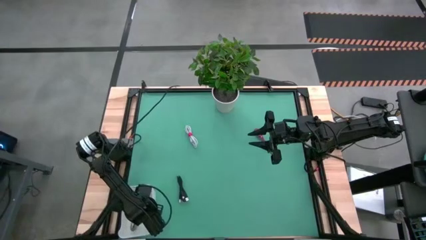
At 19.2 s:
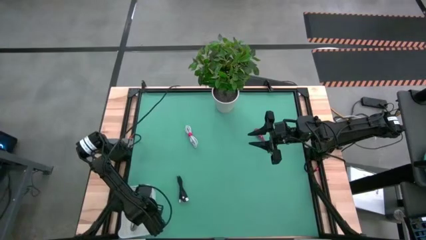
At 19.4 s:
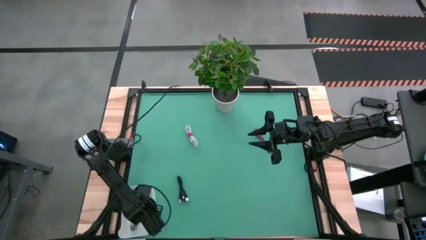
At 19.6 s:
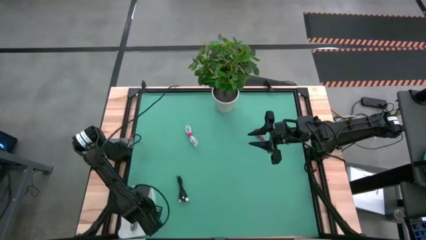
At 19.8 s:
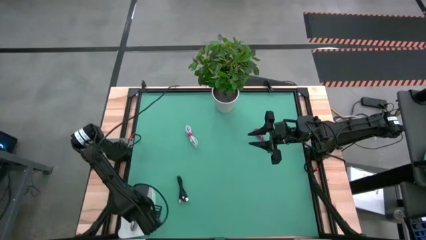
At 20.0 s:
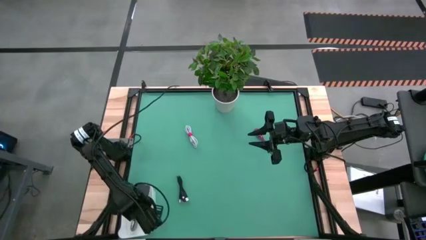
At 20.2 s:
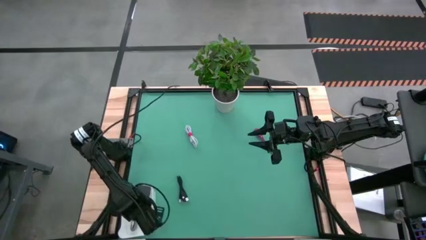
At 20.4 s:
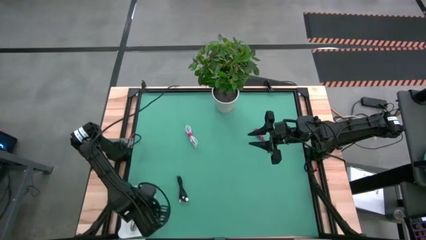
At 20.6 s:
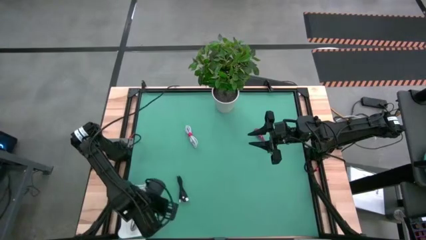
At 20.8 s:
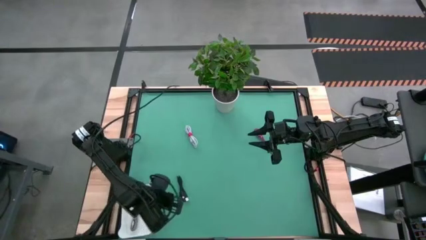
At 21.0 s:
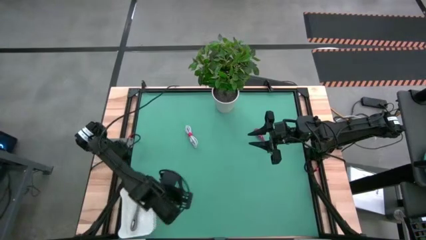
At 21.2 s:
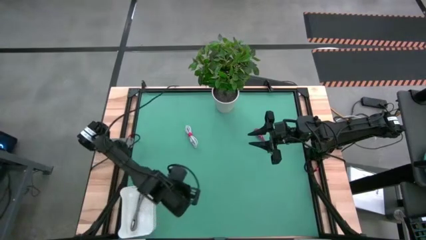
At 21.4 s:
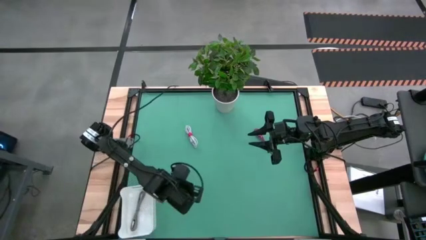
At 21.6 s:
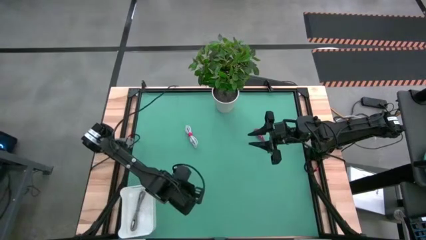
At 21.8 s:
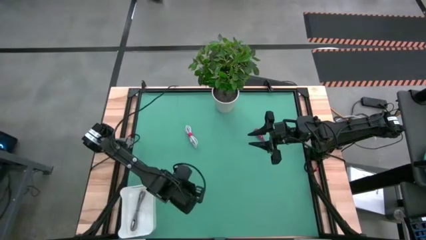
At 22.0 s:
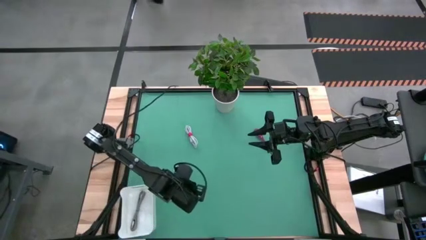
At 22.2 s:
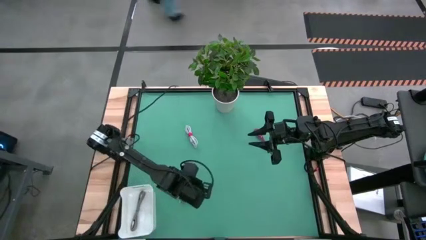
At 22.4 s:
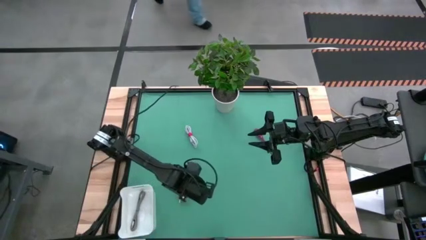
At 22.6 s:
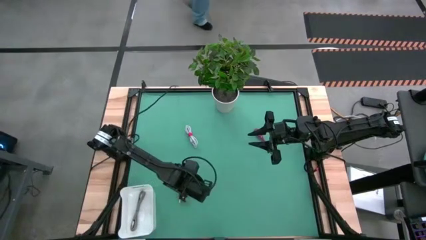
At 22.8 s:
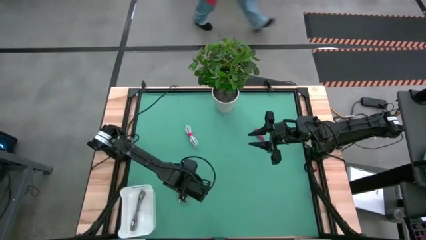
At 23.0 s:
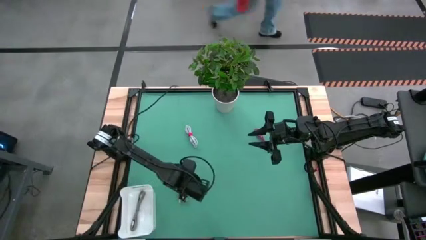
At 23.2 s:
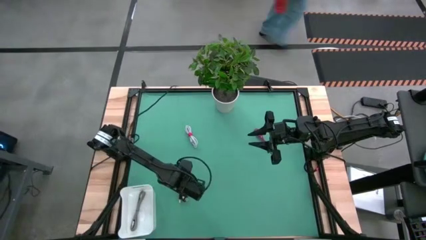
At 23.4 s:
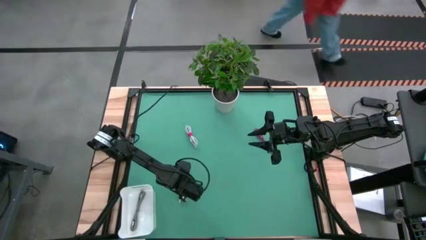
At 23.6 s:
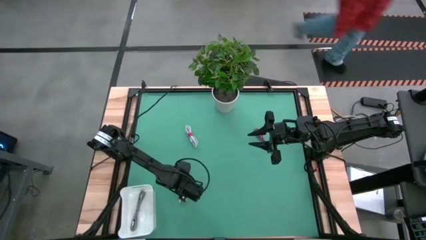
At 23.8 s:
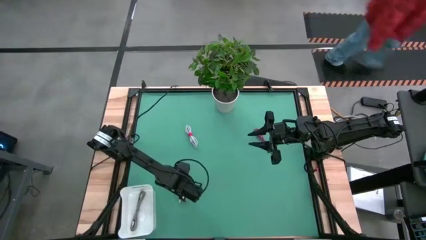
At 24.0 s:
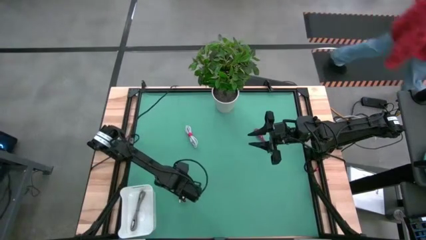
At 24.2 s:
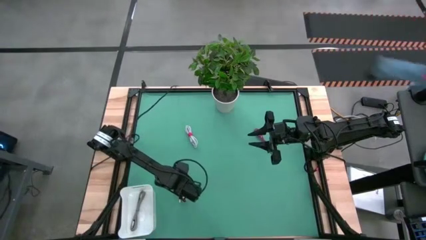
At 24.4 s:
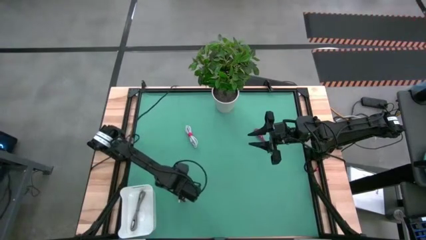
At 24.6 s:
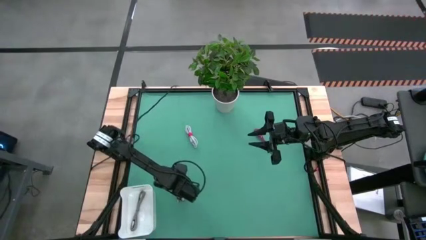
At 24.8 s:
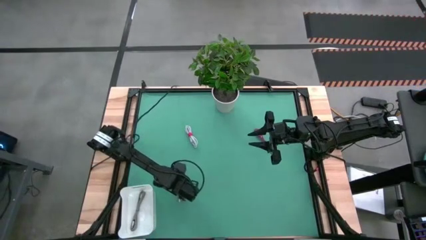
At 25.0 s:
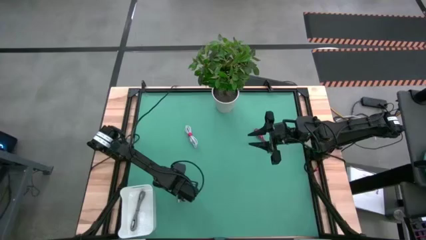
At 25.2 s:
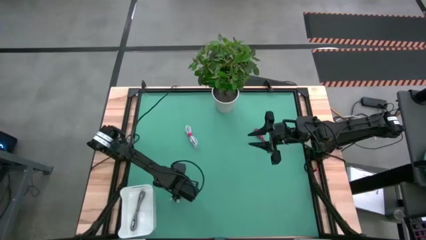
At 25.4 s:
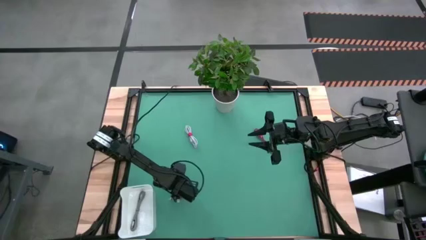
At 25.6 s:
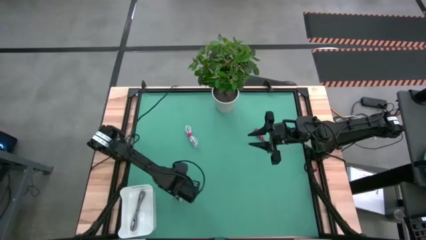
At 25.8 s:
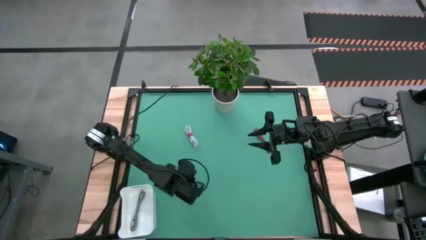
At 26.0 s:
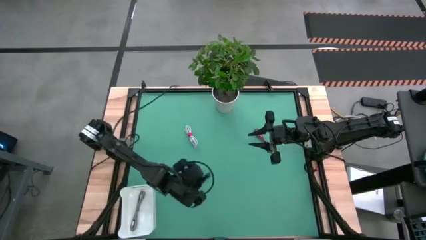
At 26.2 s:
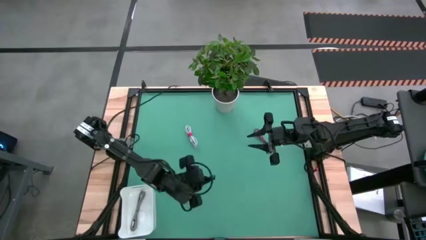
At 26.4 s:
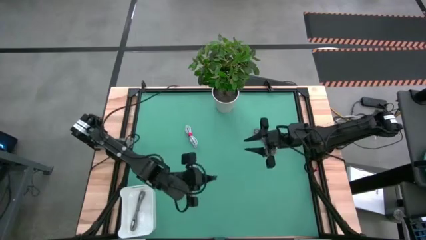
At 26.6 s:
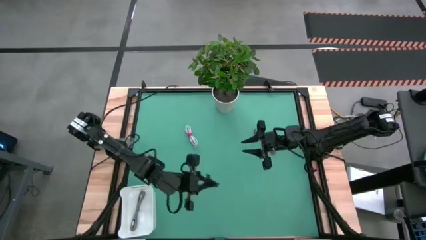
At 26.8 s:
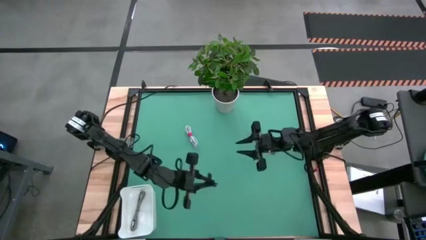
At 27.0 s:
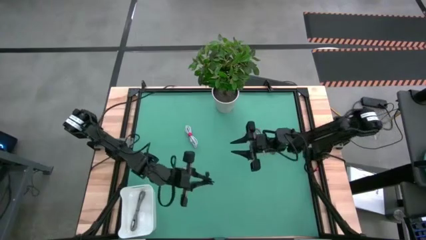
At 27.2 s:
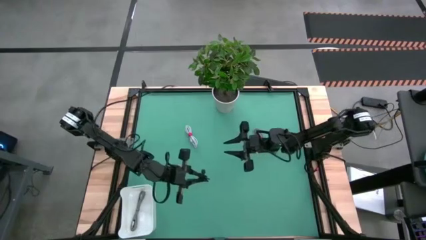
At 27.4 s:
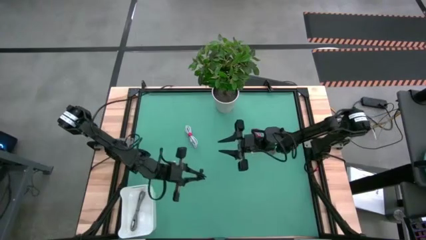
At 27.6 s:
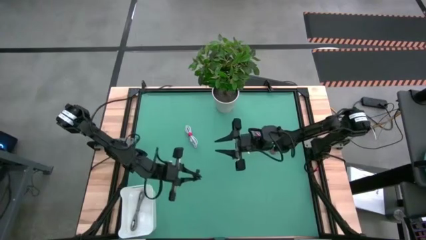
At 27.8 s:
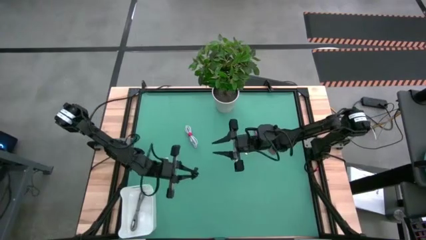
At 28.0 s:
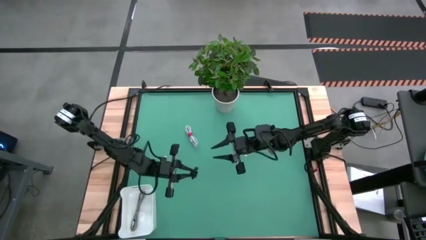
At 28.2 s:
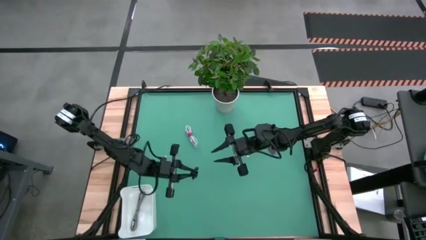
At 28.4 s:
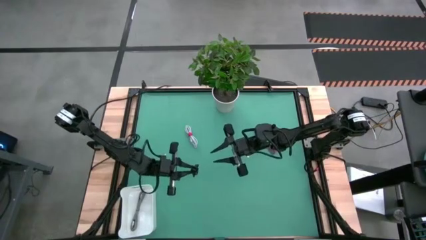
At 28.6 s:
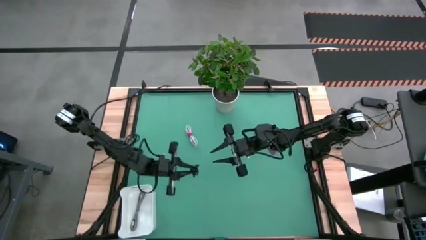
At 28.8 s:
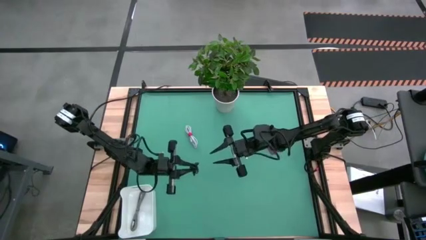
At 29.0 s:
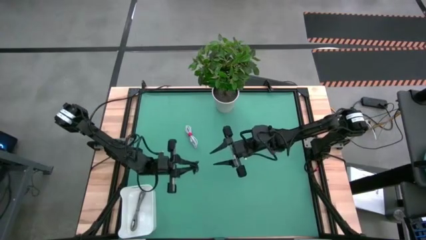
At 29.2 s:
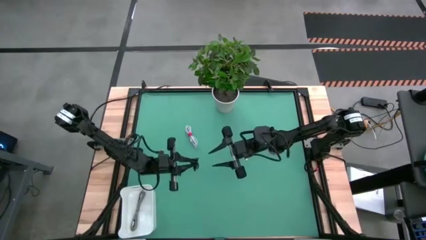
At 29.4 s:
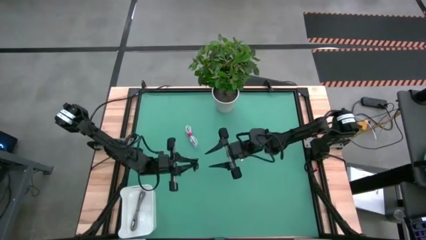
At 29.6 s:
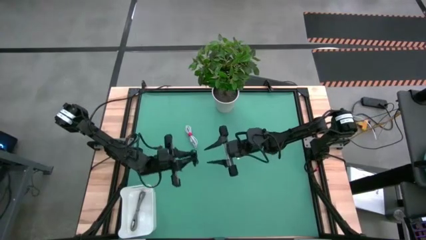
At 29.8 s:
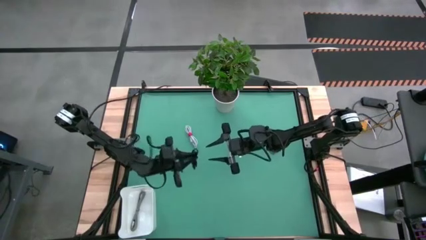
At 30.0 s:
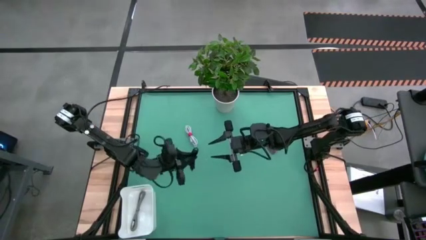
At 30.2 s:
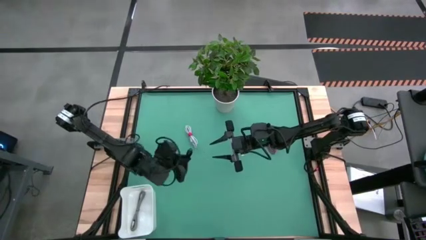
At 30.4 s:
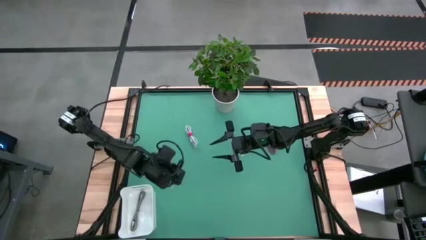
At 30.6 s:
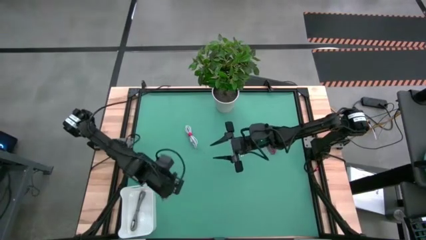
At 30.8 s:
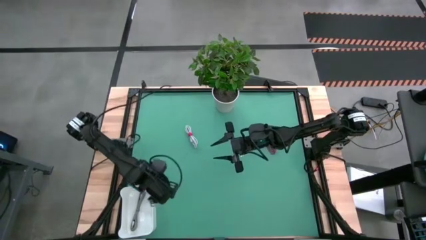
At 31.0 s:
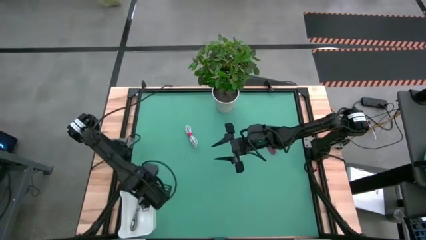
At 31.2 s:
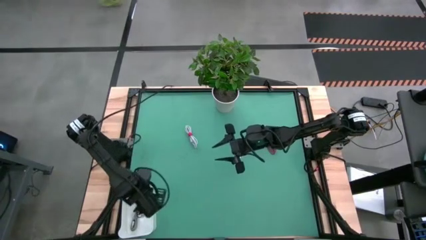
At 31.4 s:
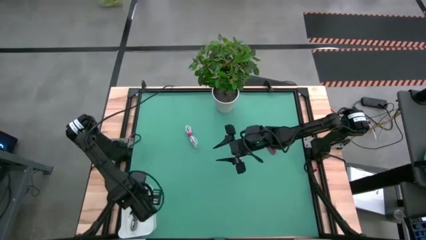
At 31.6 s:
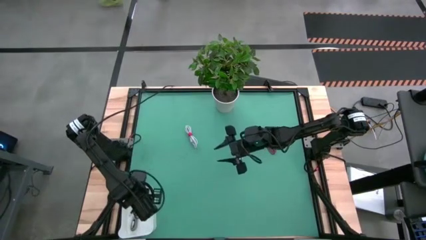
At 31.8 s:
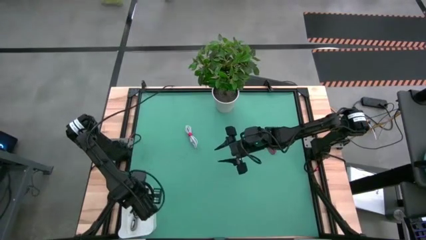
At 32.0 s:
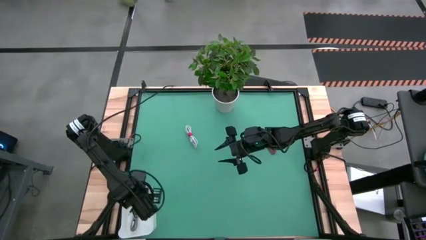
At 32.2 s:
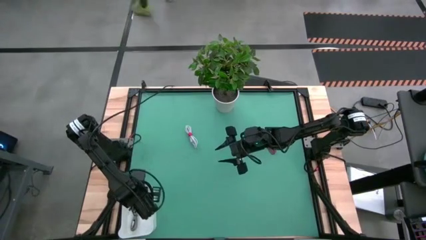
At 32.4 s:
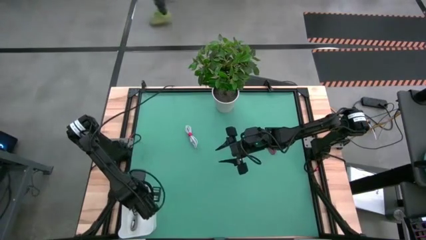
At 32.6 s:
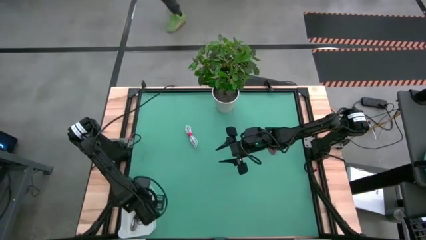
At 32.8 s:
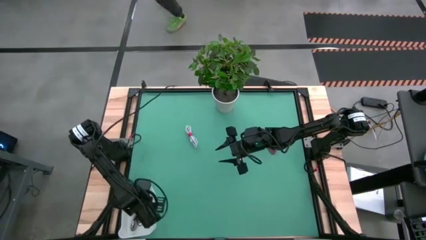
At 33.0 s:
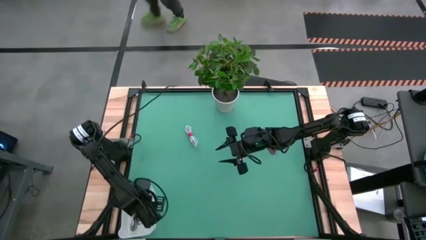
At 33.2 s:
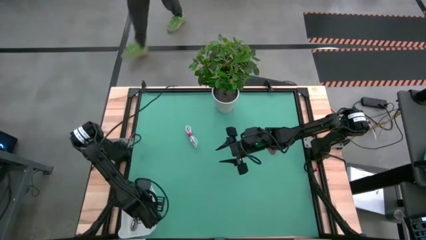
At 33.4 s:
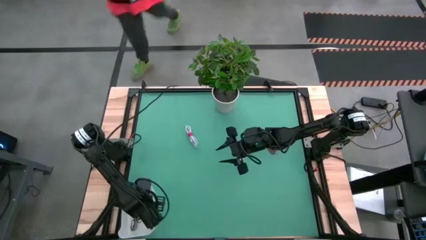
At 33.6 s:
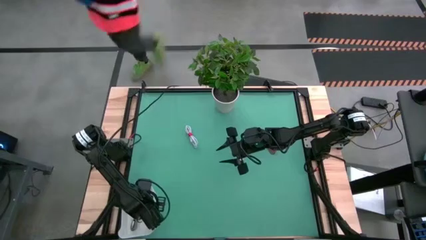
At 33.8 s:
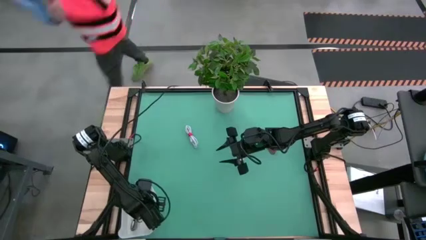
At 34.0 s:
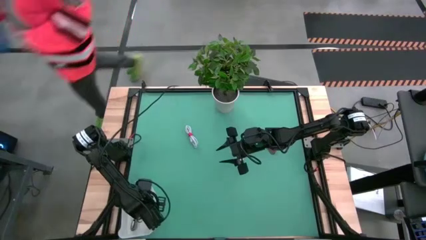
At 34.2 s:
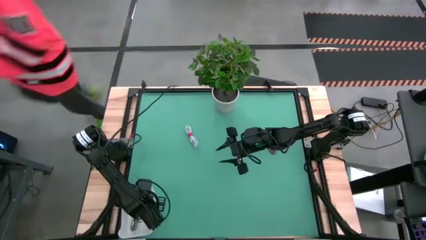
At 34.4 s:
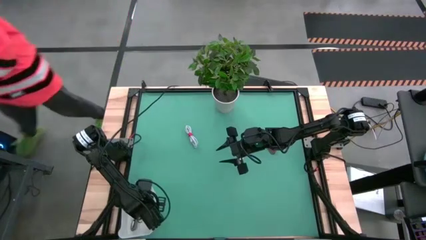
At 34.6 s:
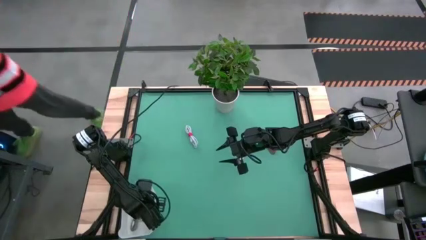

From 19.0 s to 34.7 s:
Task: Pick and place USB-C Cables
Put the black charger cable into the bin
